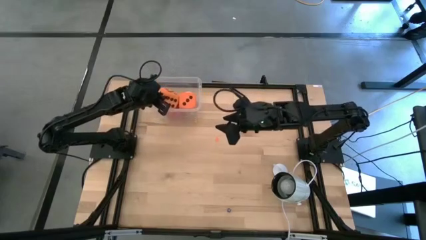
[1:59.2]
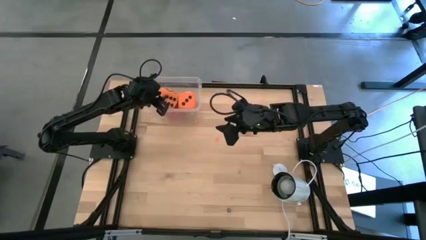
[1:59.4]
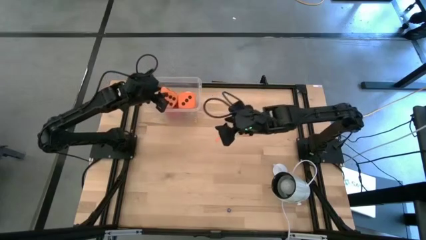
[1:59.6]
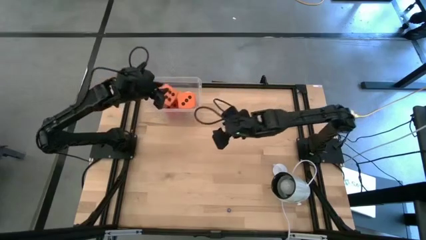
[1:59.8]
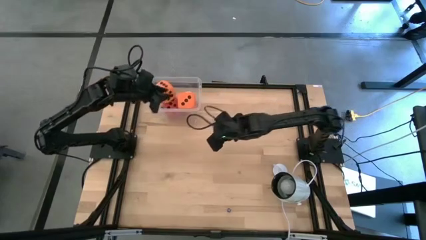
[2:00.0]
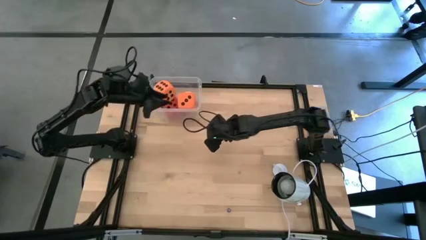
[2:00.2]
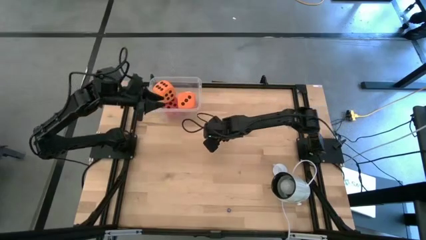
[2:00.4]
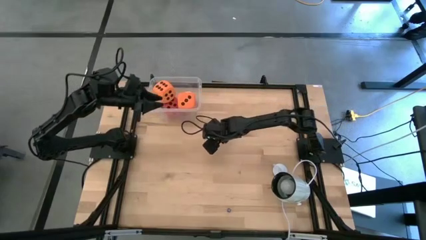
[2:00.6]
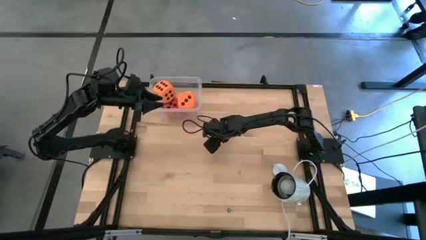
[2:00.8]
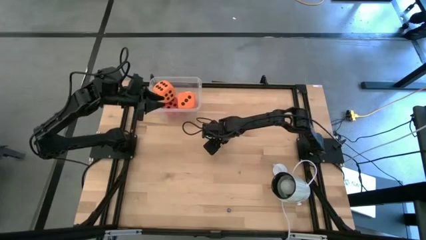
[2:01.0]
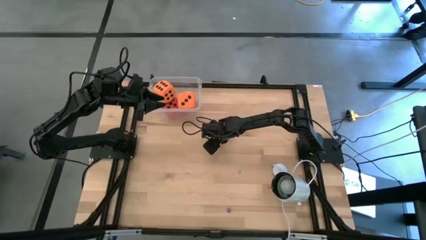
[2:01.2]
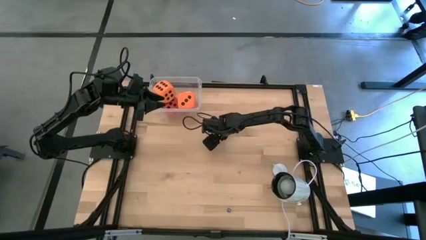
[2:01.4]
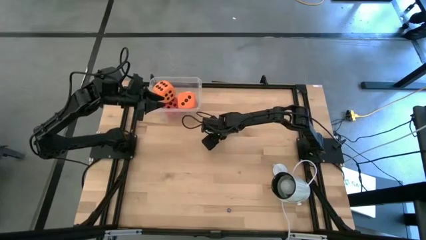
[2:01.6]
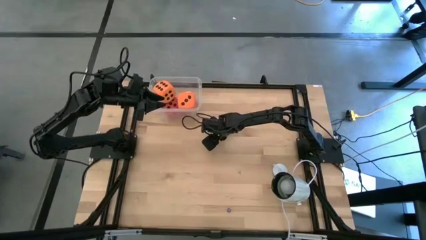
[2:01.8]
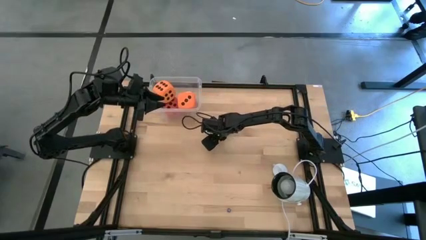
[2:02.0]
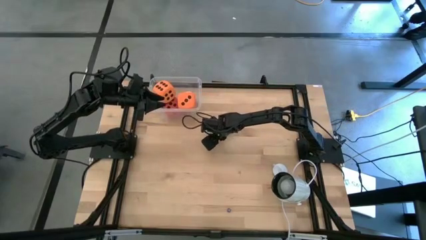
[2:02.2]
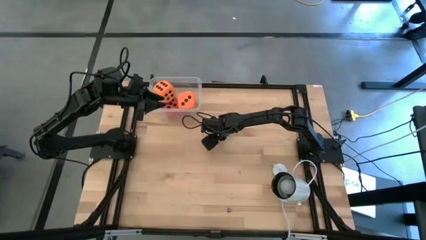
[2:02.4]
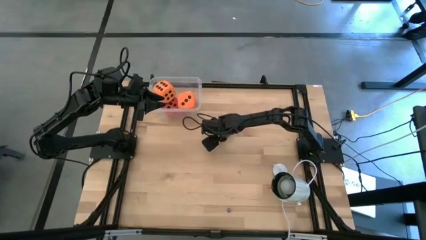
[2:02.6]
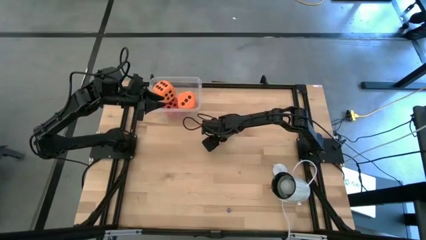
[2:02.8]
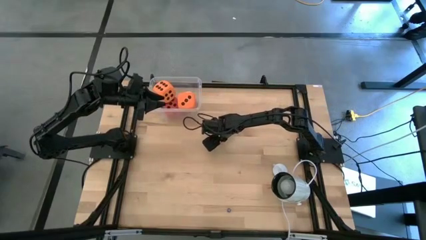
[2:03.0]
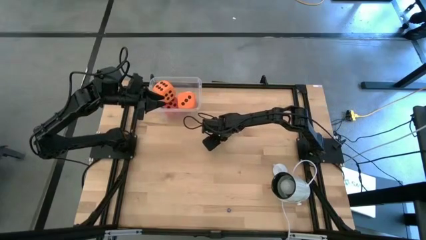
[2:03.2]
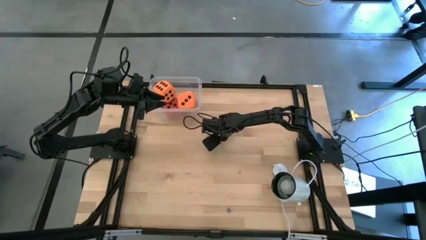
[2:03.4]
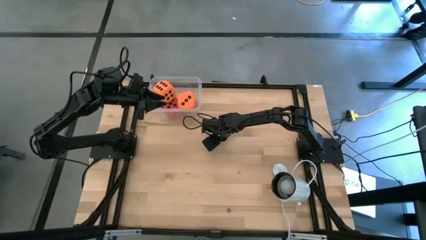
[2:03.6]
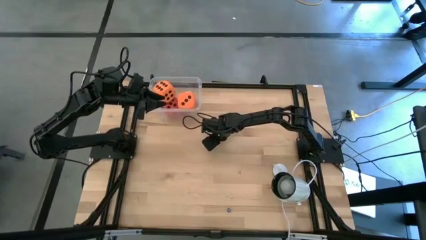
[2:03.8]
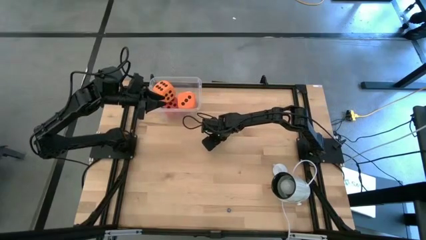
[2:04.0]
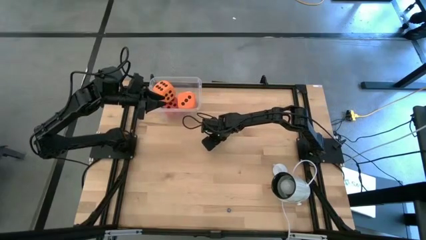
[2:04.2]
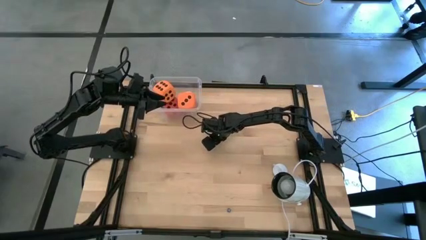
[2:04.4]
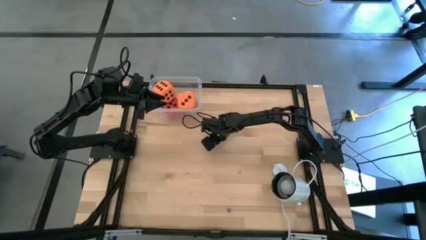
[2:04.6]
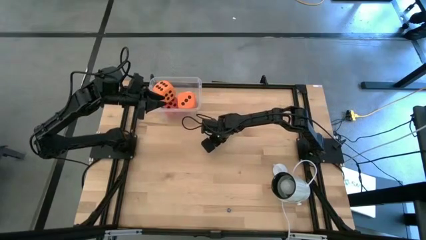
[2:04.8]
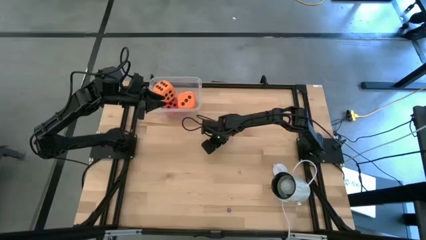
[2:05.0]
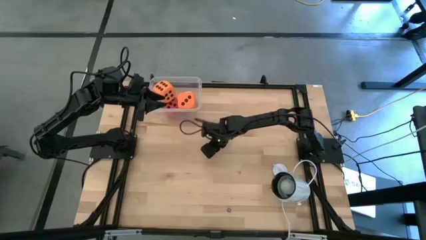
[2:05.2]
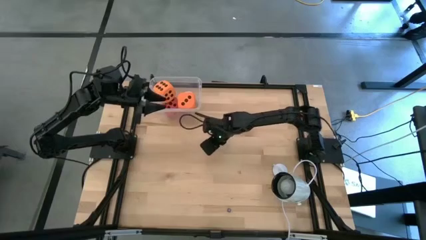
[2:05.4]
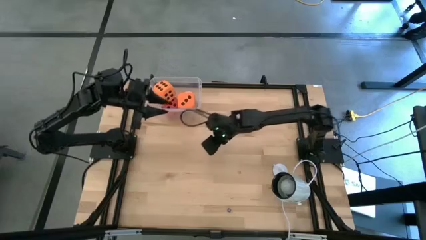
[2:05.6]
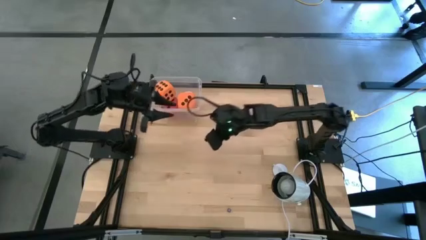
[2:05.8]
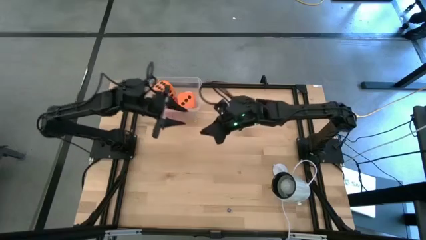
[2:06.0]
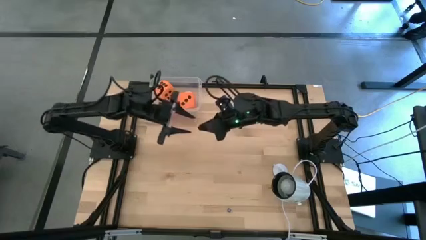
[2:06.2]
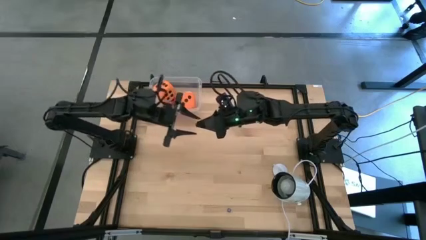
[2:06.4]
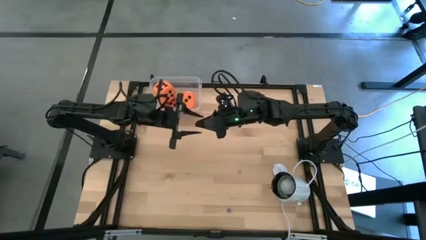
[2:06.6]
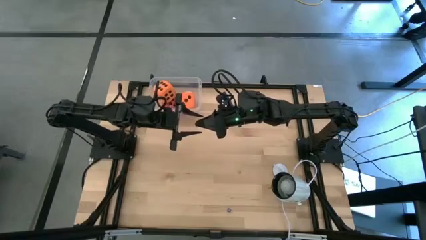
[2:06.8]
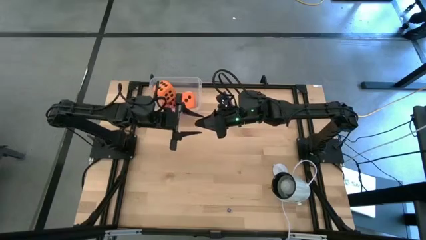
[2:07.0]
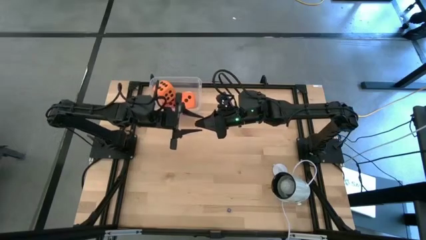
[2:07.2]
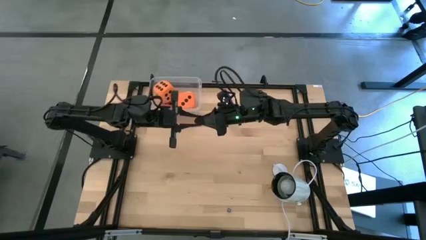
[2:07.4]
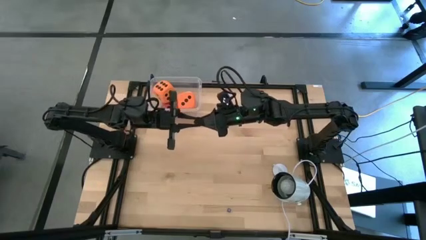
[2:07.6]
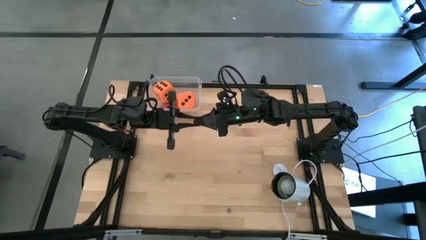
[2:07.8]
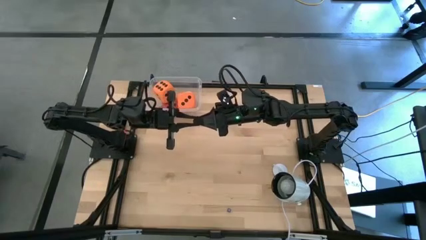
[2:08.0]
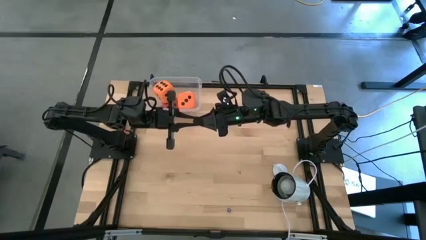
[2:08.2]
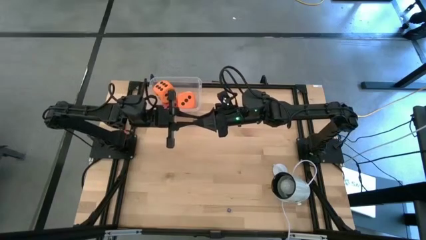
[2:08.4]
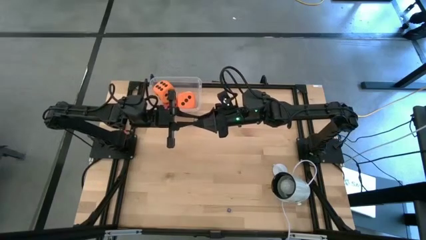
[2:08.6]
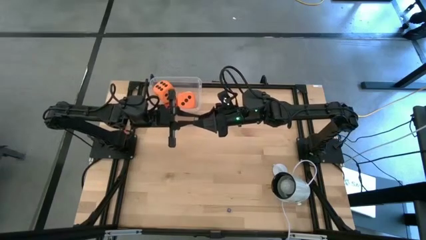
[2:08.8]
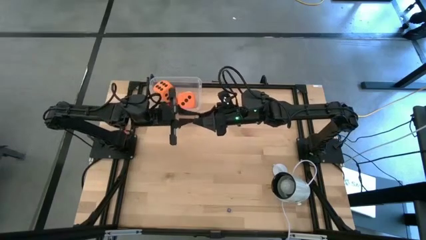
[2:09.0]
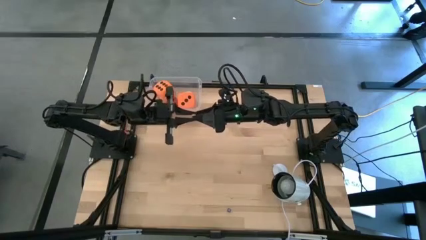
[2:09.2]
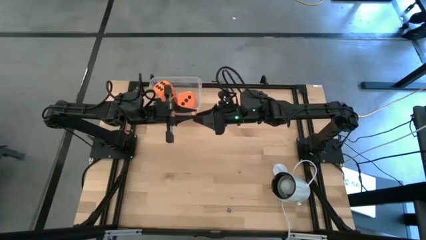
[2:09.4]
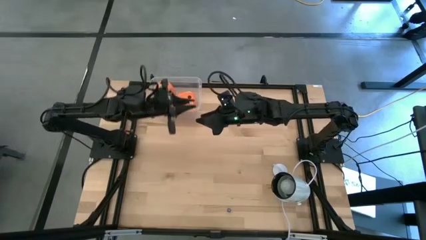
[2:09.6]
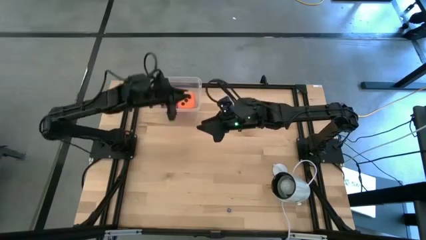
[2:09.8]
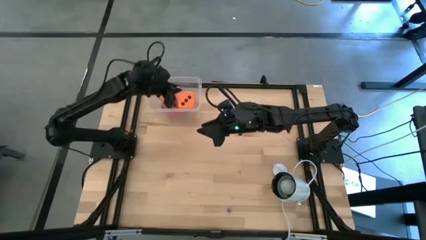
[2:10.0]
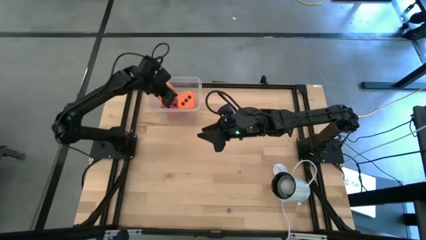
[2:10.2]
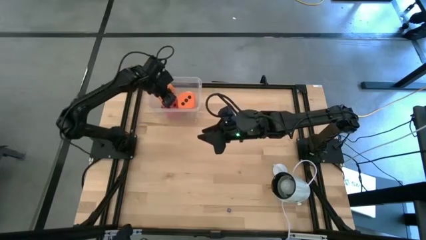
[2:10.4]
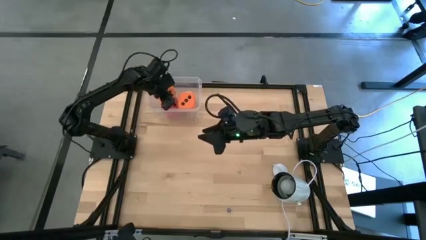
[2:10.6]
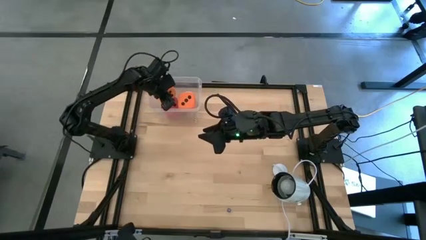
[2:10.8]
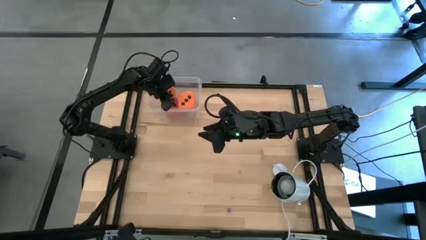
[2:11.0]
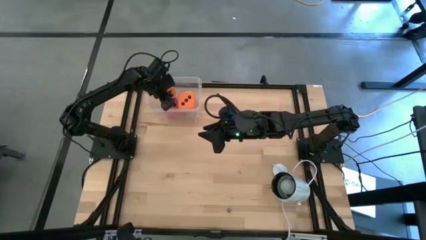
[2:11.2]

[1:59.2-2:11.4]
Task: Pick & Place Dice
Put the small orange die into the transparent bin
